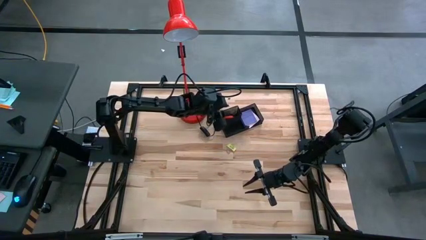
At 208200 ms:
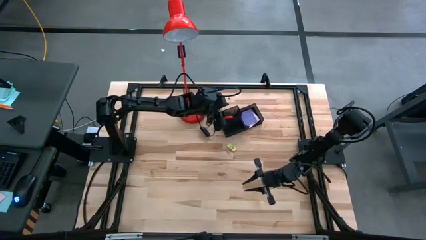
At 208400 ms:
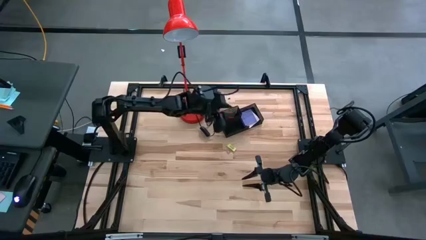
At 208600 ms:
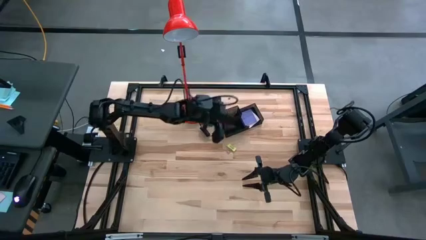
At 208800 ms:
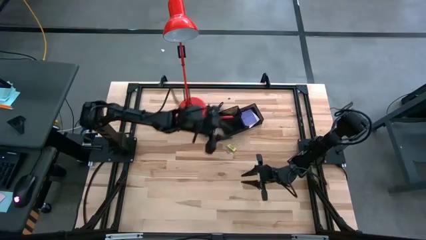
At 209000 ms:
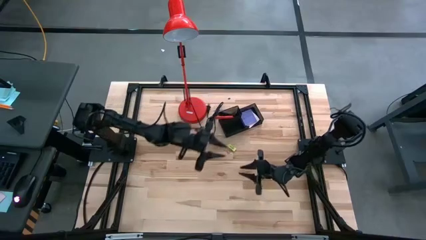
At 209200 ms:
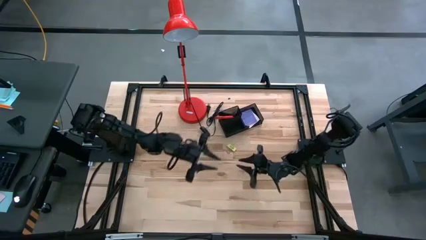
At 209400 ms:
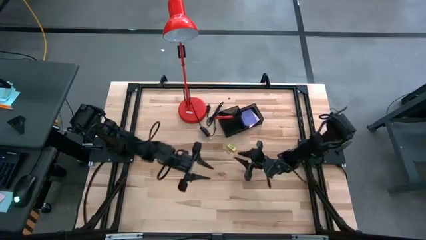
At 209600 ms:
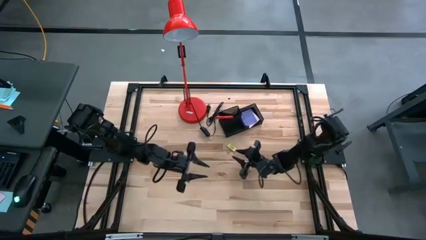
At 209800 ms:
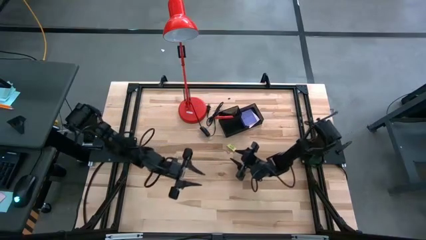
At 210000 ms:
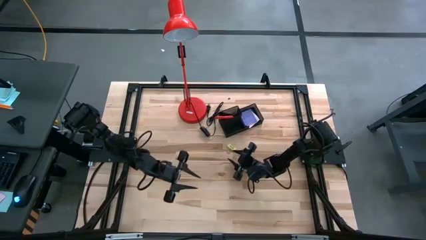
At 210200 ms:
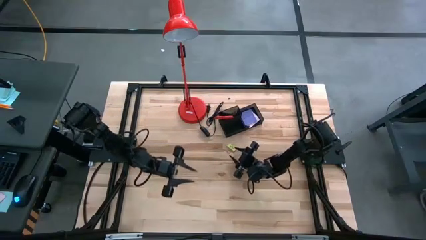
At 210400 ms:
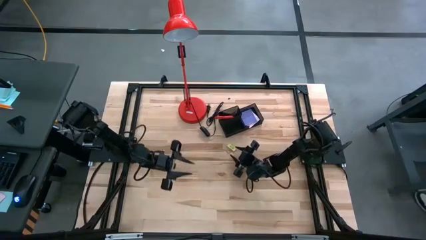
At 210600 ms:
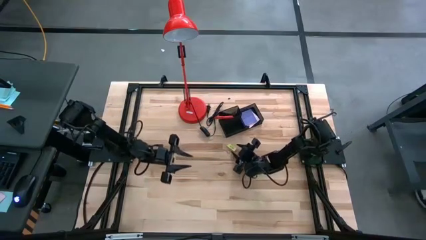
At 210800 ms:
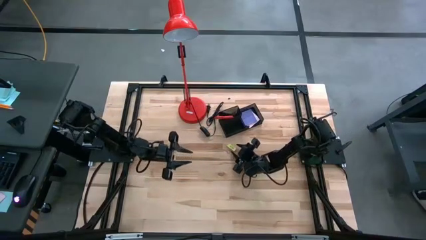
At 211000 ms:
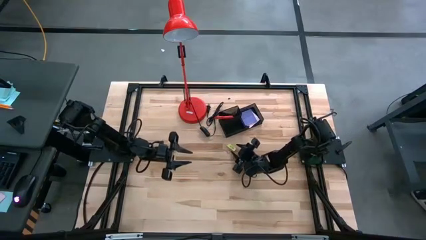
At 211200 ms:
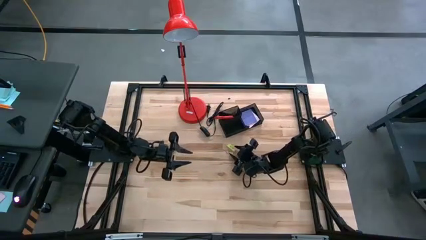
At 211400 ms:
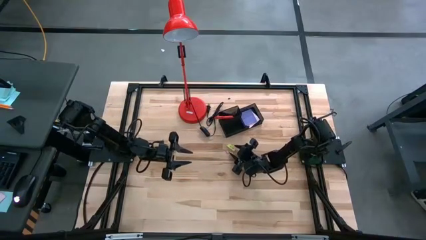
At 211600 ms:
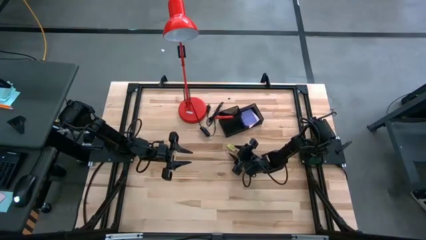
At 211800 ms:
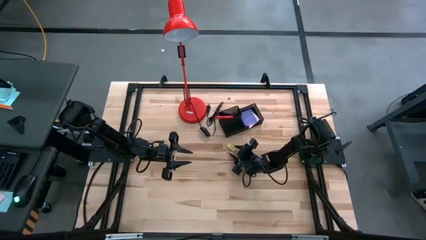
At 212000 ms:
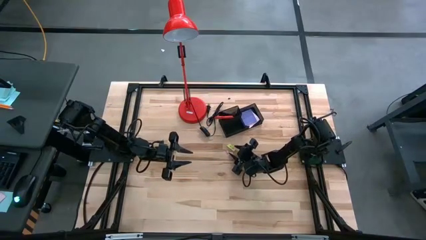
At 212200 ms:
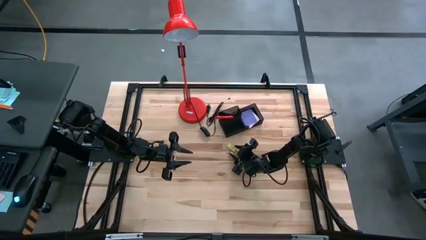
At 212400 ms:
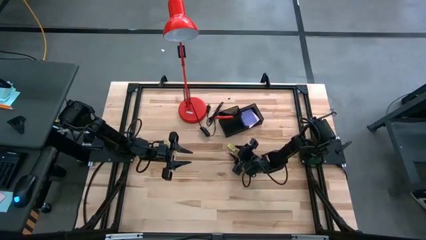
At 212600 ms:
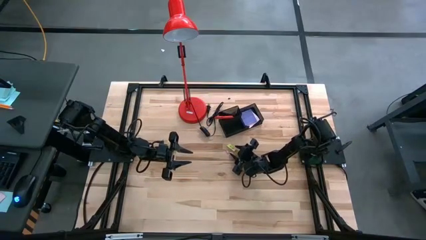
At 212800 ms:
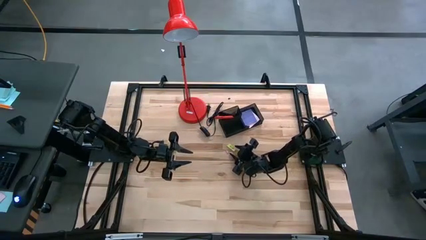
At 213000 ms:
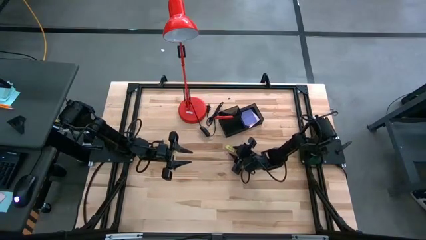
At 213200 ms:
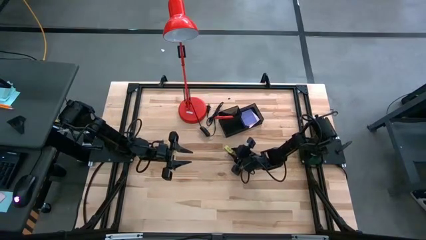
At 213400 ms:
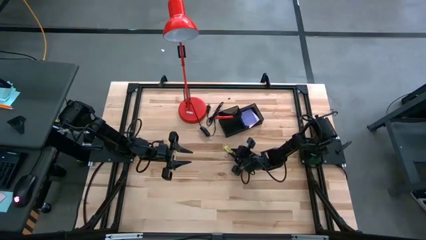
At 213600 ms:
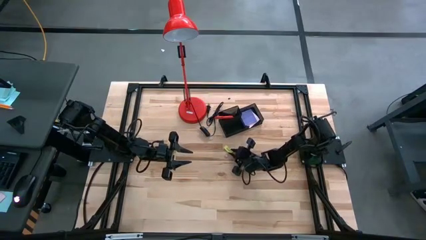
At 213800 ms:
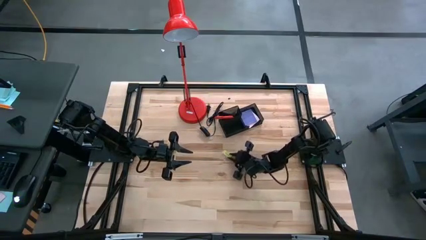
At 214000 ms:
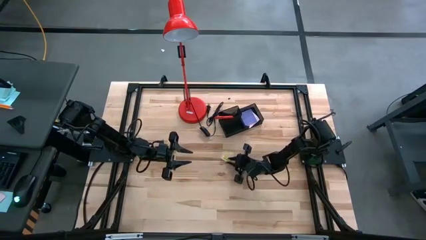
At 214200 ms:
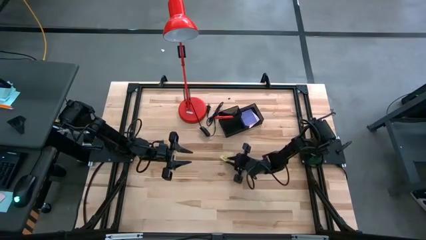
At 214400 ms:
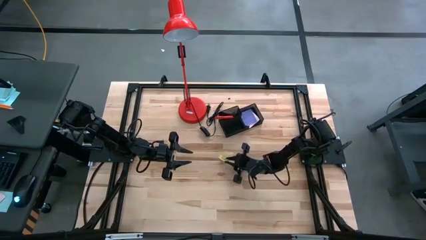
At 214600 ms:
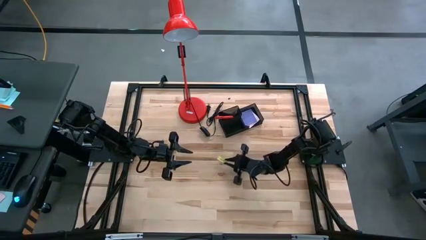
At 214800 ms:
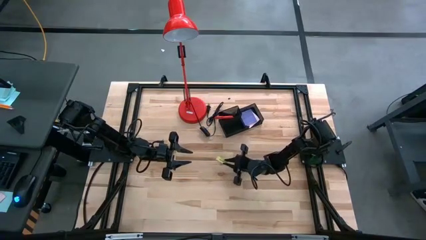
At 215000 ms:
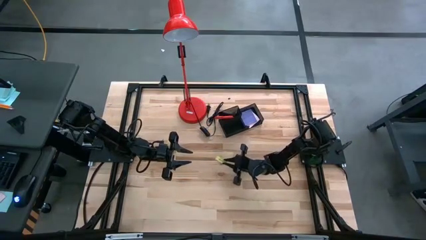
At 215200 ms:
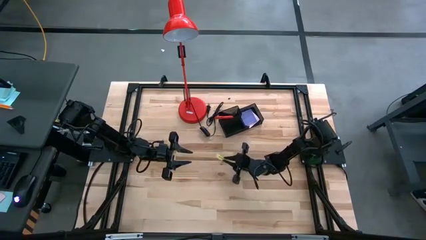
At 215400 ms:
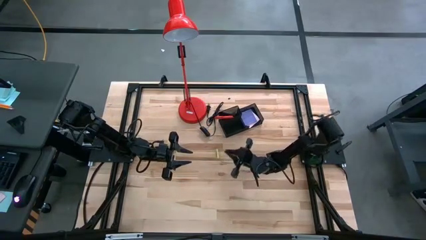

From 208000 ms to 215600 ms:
Task: Pick and place office supplies into organizer
Put the yellow eraser into the black desk organizer

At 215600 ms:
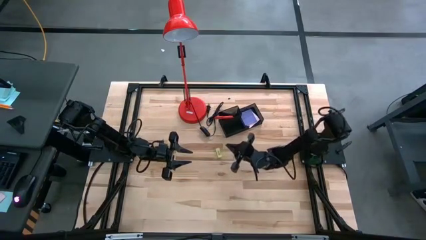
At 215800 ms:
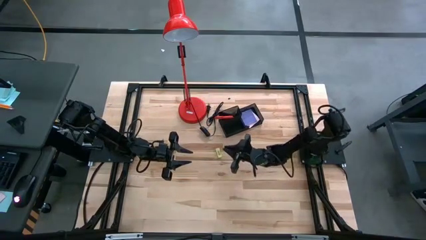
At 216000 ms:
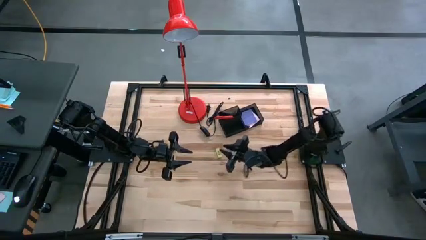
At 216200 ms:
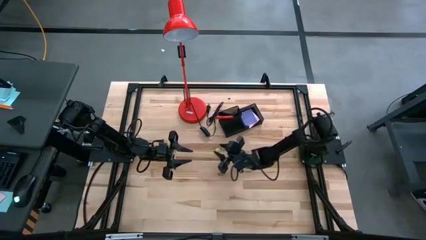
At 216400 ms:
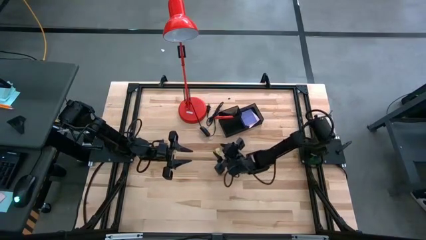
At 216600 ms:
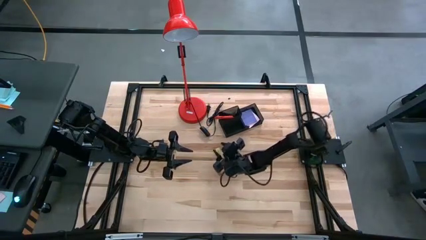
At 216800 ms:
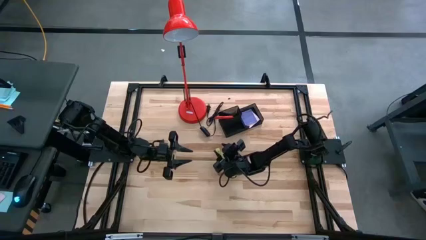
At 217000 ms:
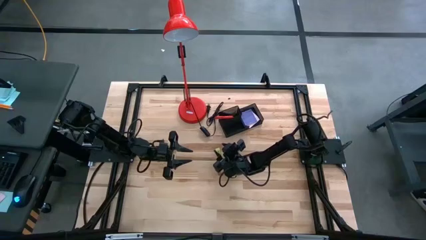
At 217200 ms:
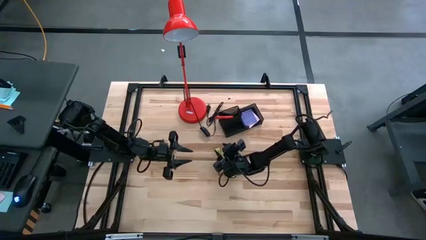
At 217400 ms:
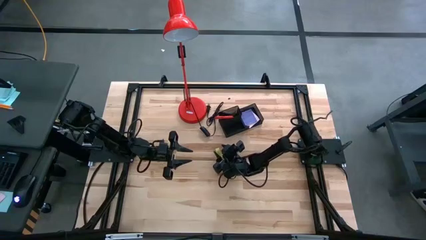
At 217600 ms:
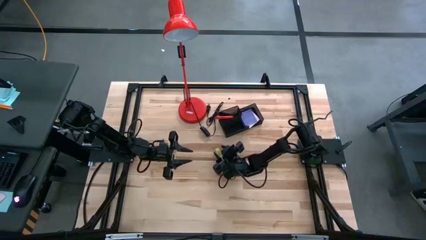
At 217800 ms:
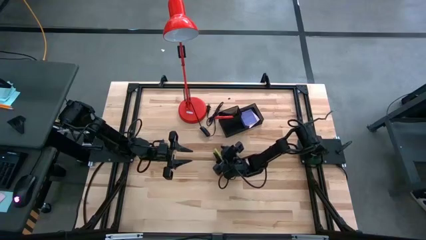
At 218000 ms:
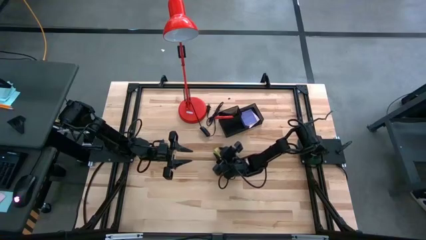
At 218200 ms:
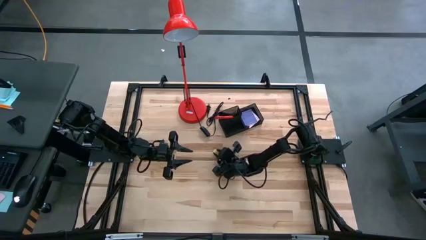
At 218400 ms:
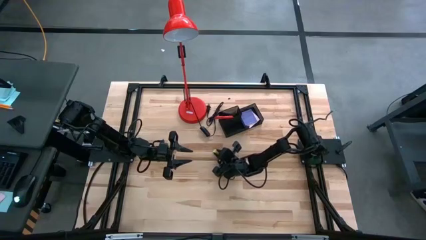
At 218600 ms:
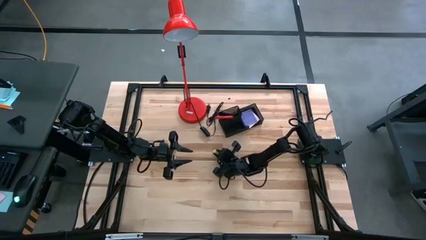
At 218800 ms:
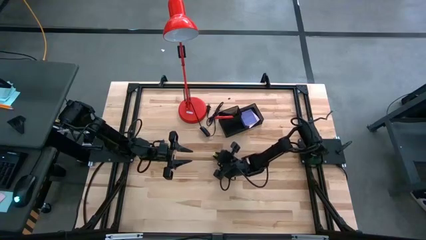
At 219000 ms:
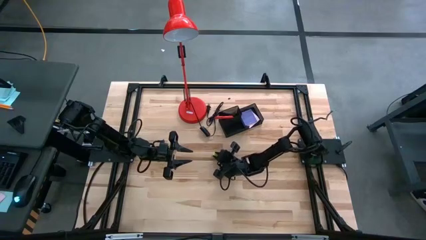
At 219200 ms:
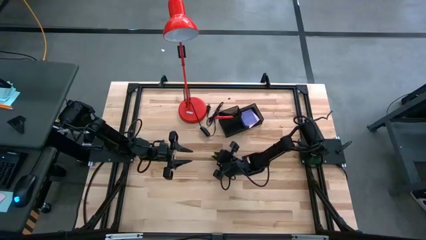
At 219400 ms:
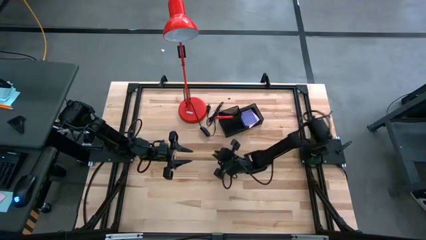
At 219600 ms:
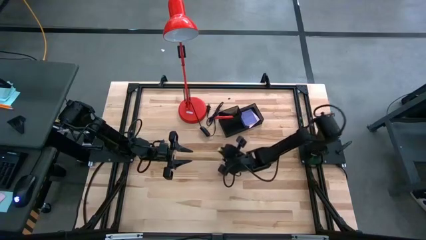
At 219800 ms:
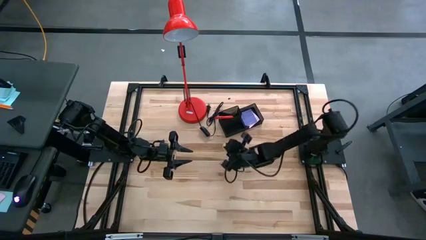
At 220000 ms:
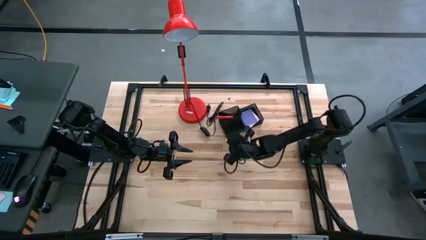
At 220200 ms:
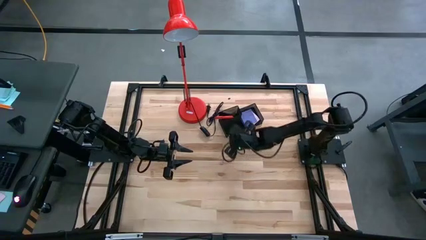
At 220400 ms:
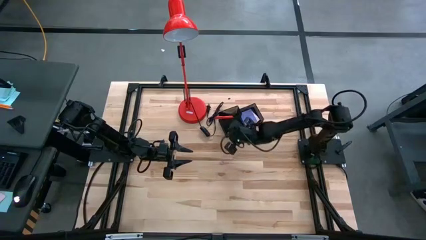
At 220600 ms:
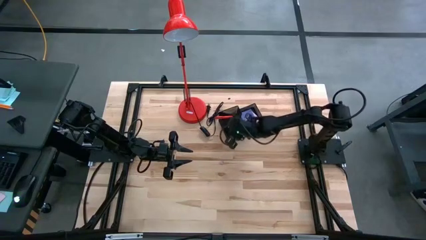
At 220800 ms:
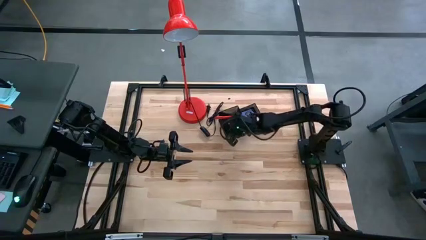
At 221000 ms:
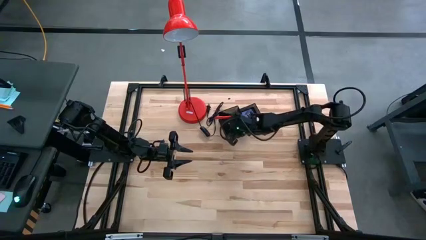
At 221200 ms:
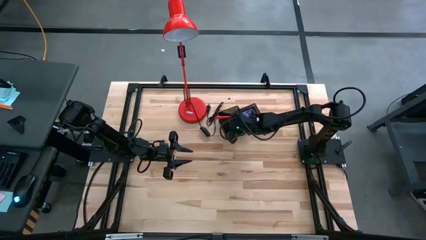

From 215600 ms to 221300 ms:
Put the yellow eraser into the black desk organizer
